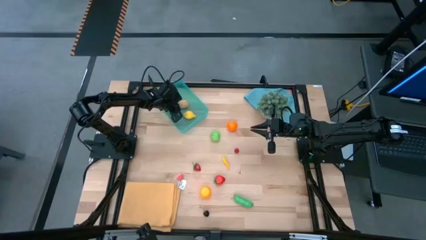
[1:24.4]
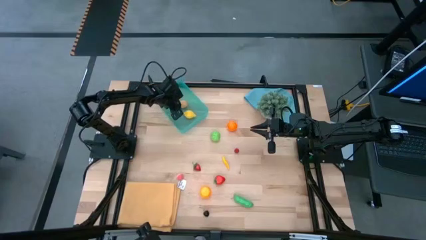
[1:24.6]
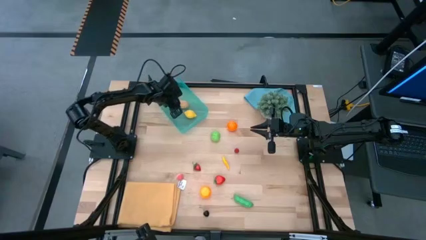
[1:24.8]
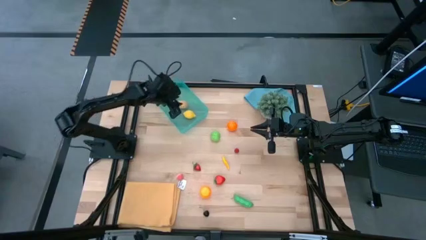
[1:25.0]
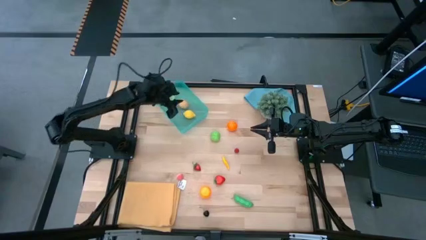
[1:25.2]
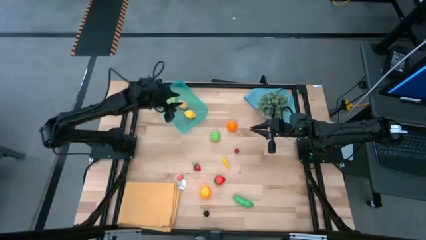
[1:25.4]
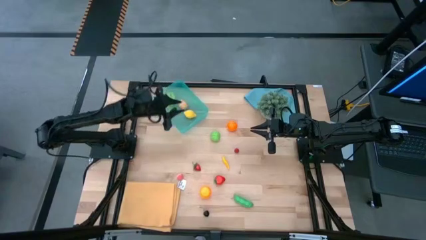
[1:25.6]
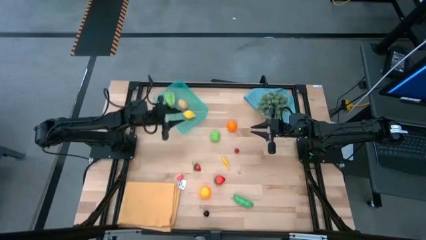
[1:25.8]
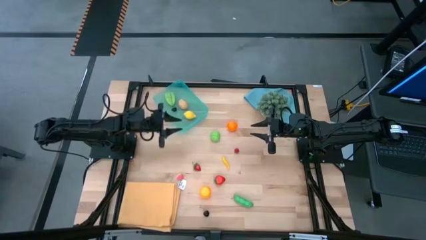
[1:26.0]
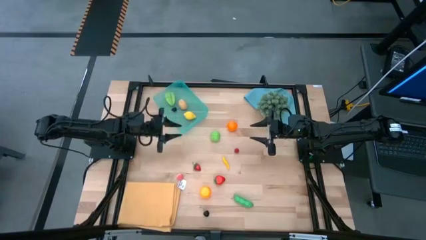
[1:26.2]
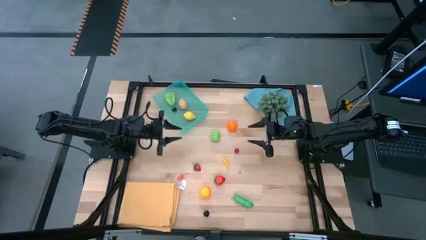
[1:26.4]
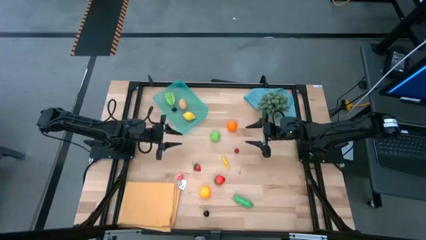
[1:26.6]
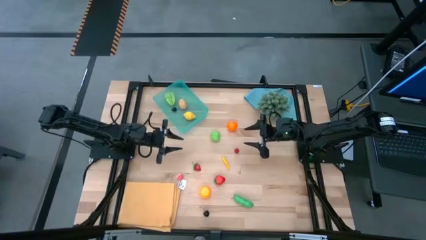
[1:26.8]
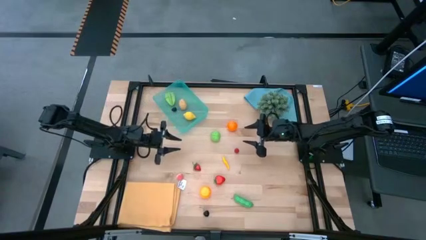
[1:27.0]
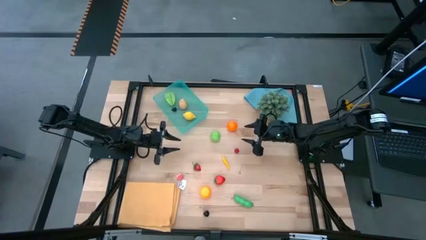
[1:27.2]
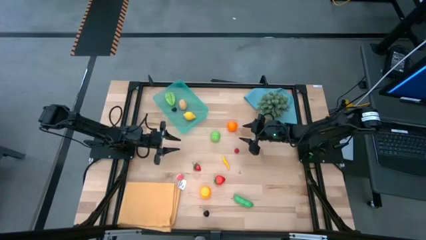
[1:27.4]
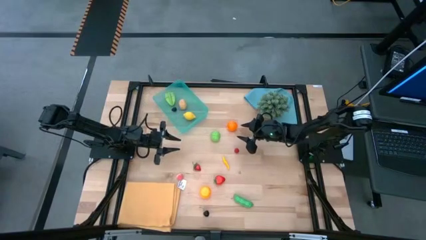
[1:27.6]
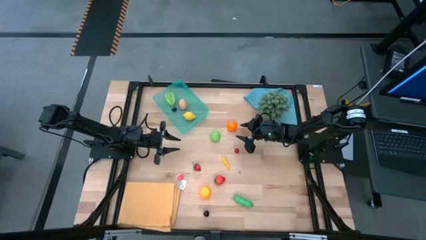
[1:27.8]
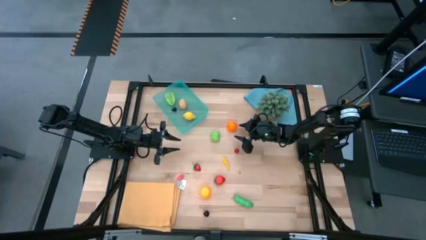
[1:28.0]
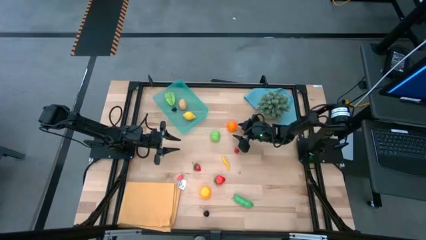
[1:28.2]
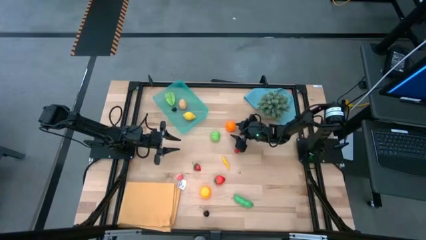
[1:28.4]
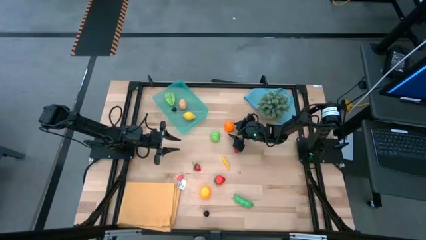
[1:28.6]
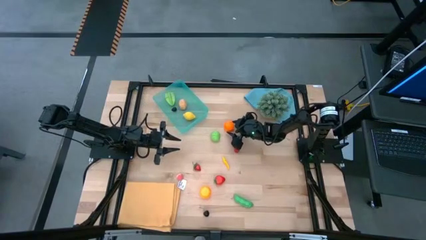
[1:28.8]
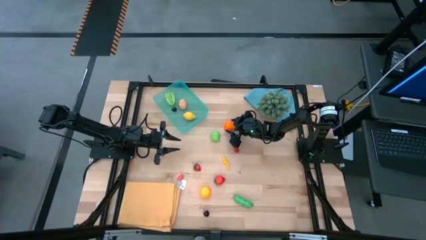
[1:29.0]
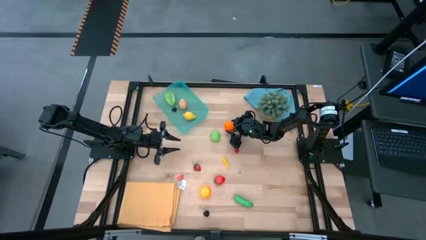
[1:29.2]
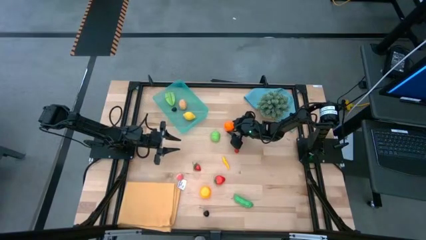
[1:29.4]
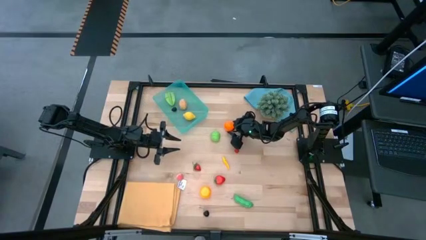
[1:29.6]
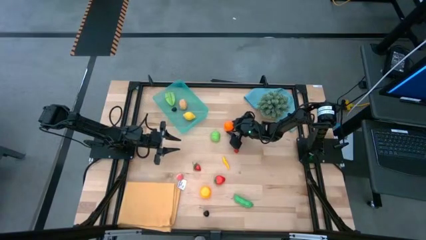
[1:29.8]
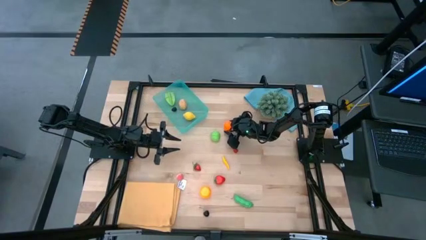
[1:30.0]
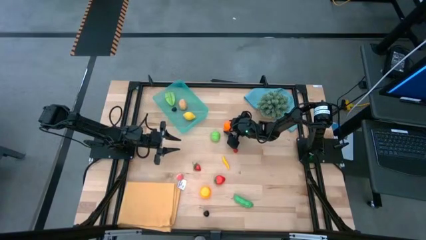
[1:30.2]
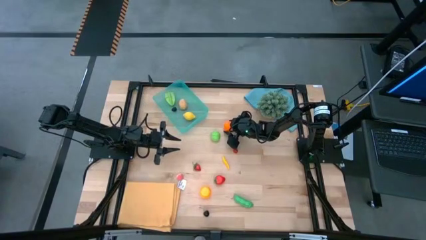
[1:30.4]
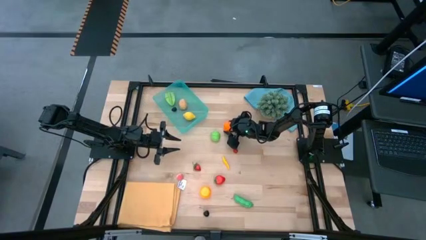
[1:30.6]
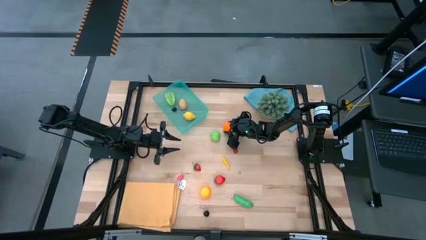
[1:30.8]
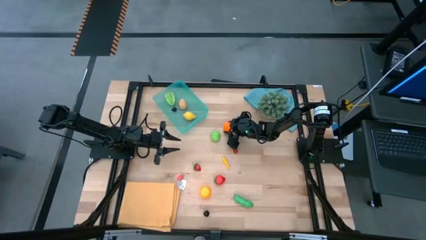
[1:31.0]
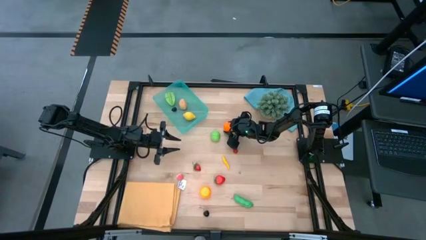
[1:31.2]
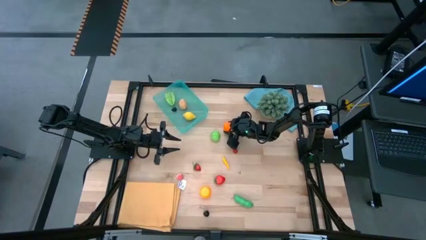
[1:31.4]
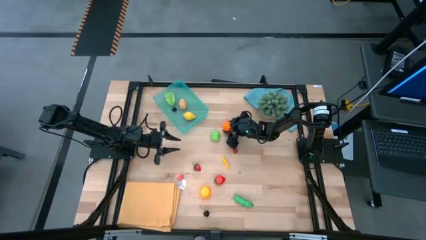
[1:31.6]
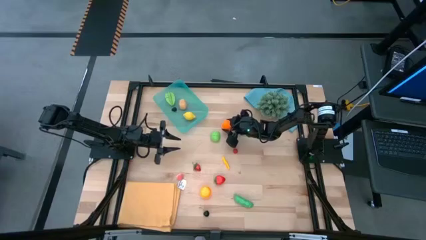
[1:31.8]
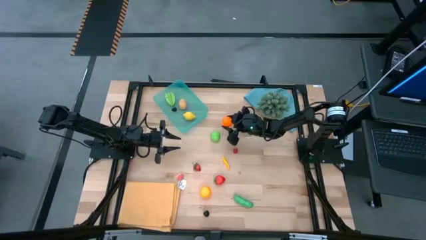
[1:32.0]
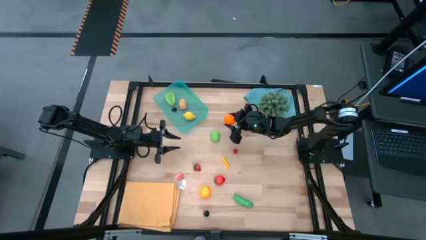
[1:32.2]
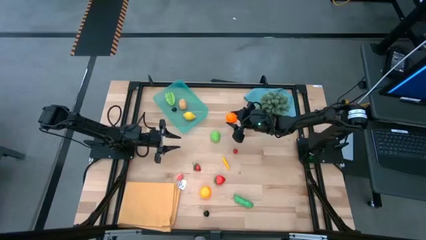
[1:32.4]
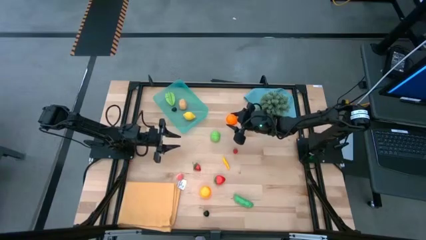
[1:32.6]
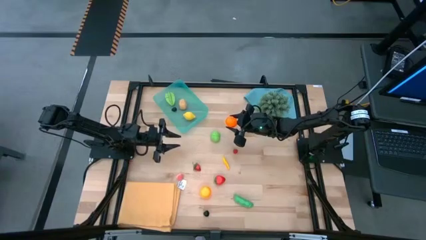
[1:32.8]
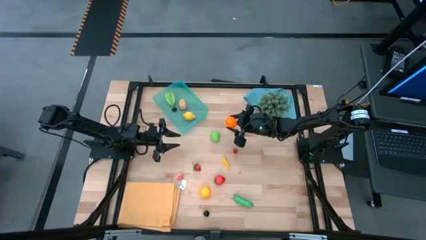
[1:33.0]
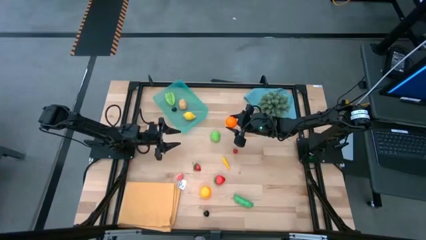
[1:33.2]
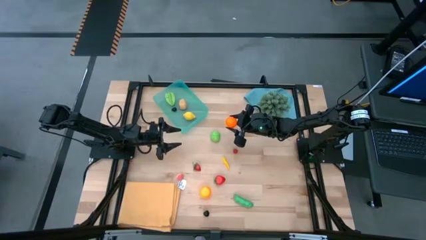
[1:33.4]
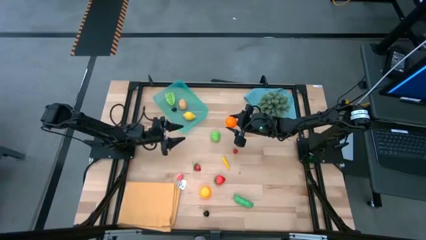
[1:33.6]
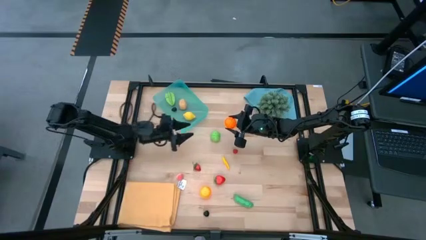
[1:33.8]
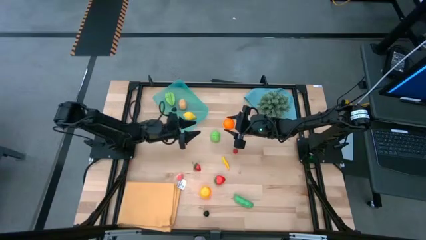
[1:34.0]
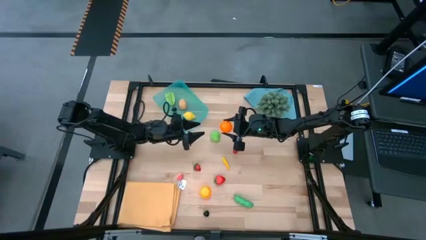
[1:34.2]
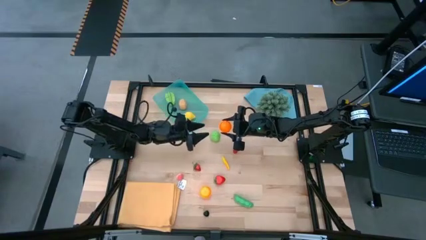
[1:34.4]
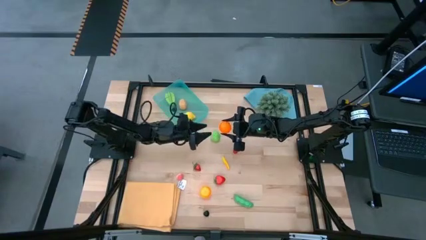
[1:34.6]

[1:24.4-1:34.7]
Task: Pick and placing Produce into tupperware
Put the orange pumpkin into the blue bin

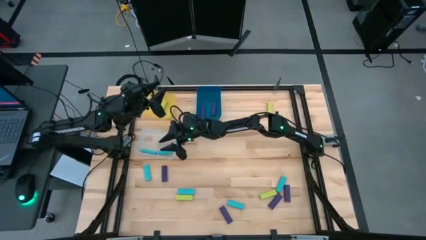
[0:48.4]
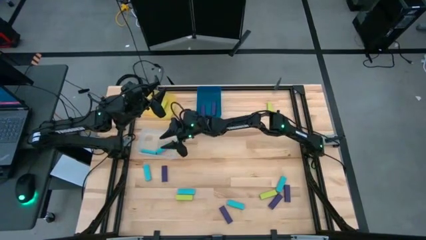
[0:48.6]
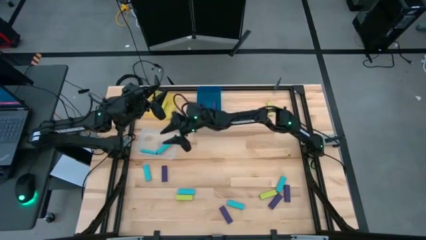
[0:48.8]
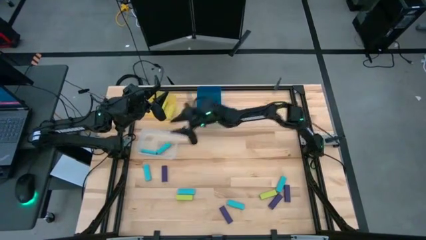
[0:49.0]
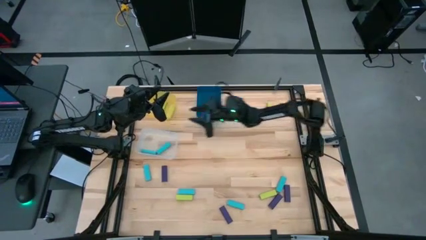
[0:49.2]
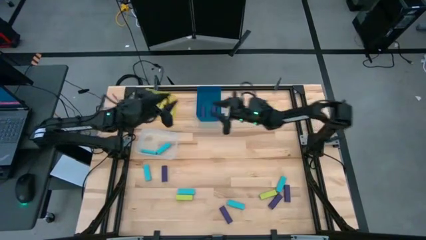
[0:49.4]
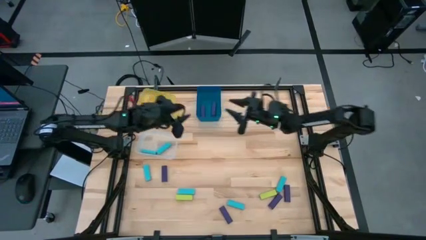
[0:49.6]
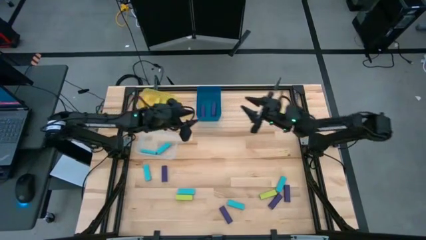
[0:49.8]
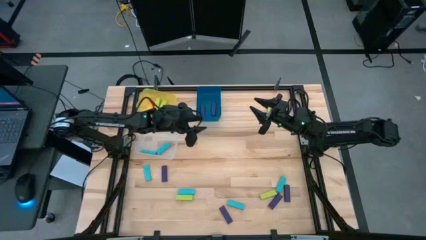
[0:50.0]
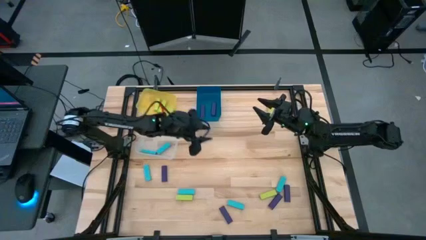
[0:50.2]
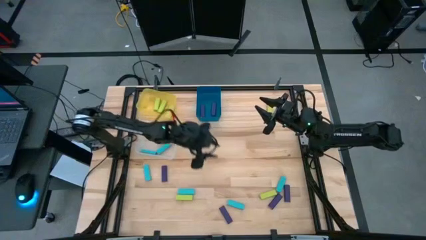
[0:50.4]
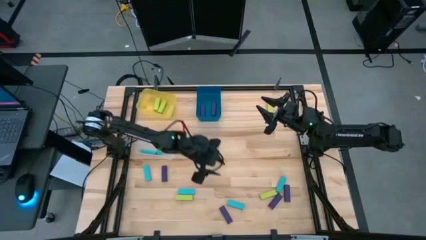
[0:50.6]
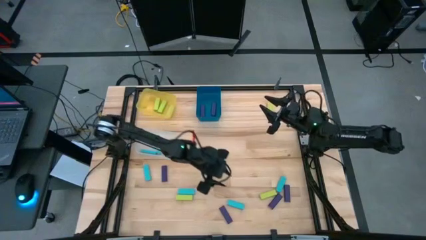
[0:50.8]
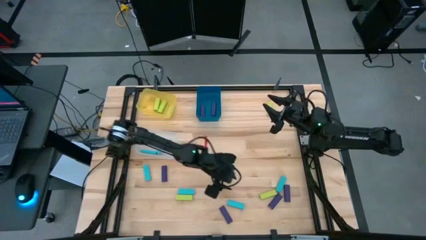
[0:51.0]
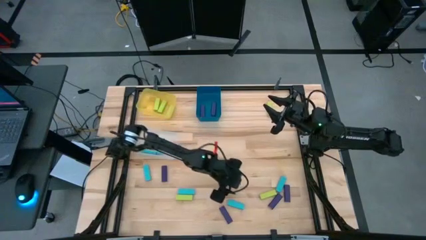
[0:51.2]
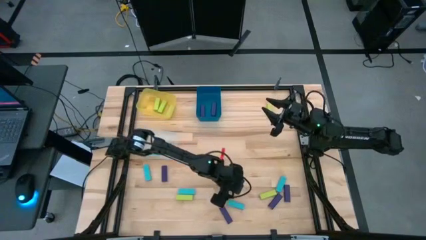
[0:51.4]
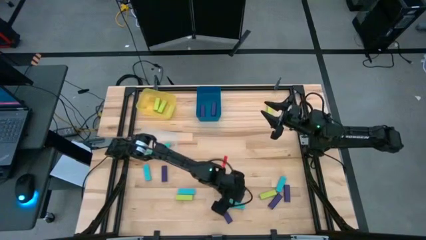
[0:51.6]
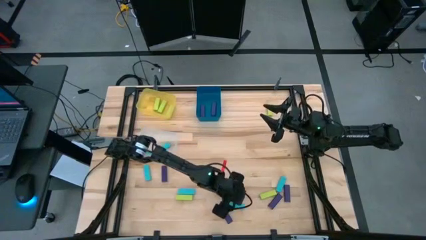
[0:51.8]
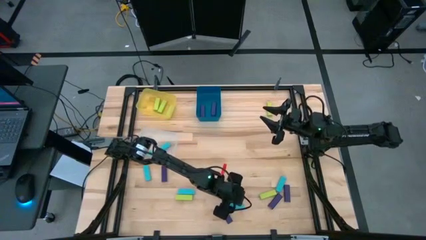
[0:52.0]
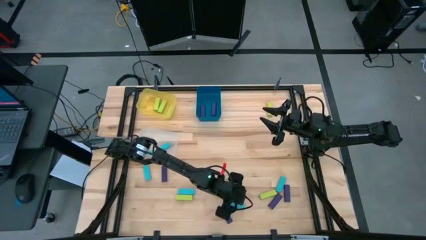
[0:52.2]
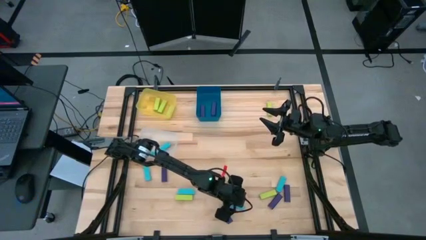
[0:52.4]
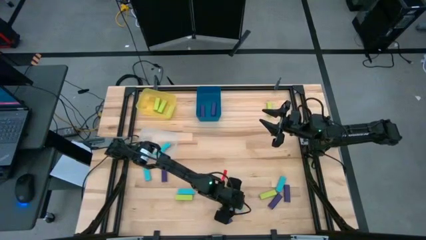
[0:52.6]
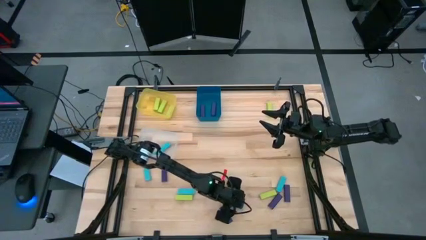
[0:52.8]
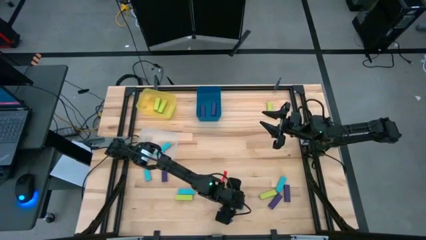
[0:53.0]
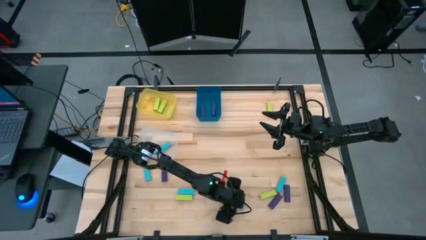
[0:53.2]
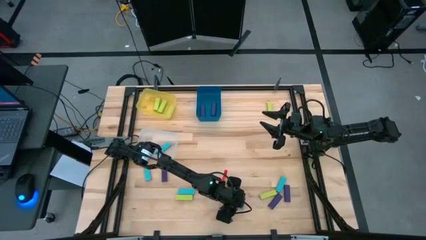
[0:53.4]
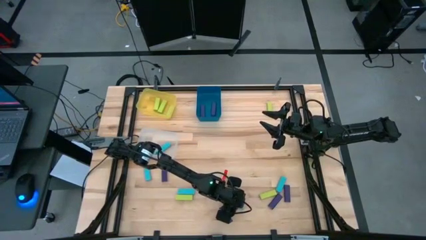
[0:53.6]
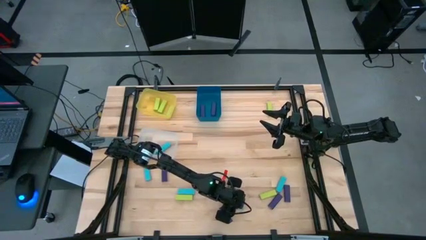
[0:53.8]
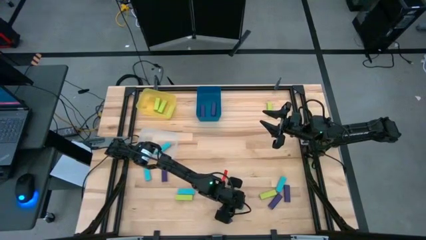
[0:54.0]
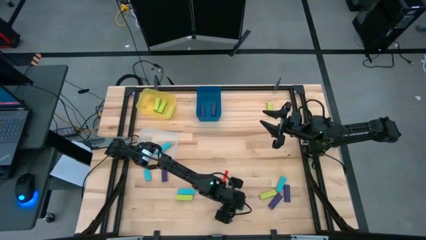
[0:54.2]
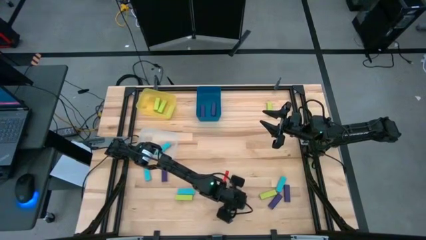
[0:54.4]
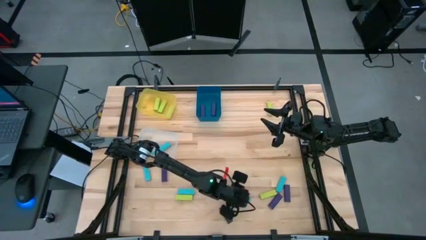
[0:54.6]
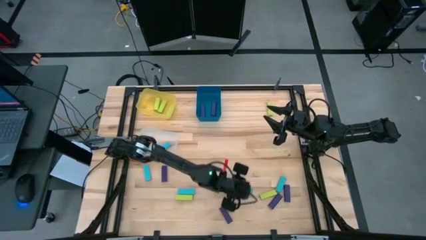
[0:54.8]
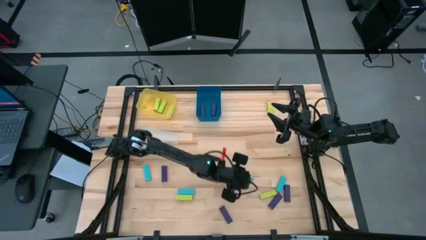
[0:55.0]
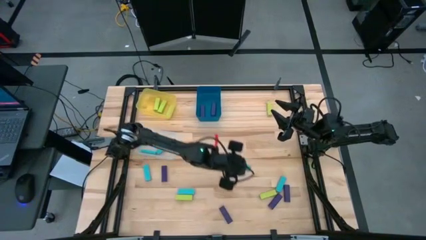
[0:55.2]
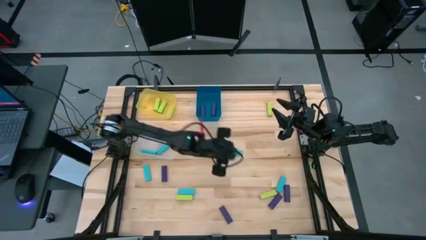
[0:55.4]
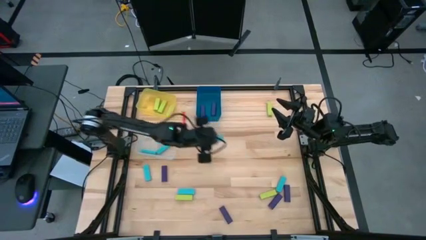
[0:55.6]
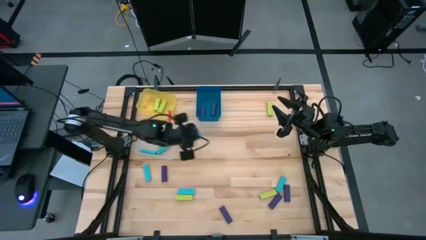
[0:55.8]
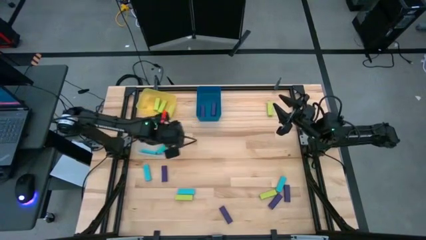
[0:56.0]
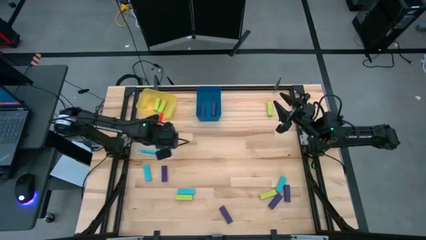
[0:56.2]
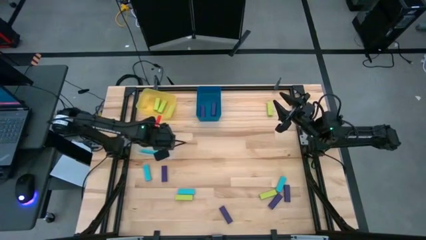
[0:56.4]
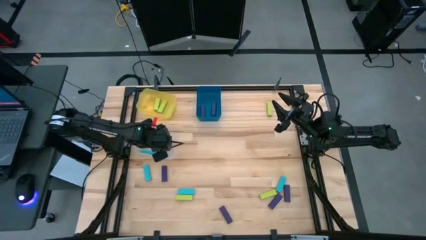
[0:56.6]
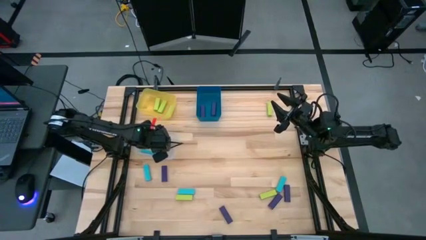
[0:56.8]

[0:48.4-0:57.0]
Task: Sort blocks
Put the blue block into the white bin
